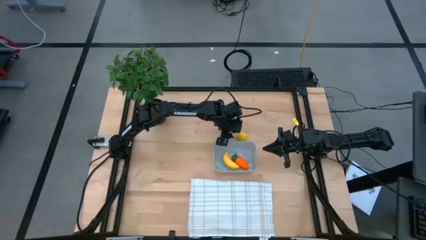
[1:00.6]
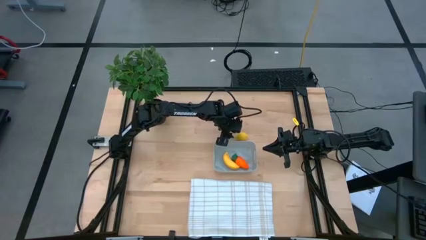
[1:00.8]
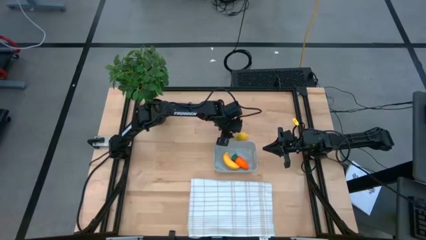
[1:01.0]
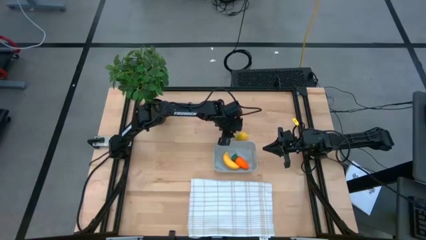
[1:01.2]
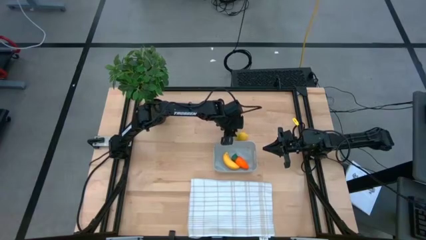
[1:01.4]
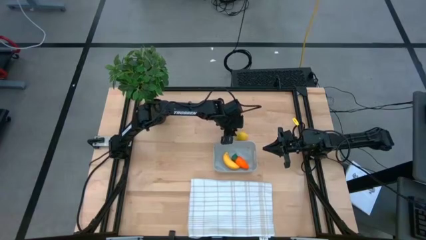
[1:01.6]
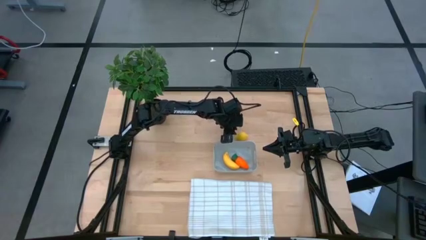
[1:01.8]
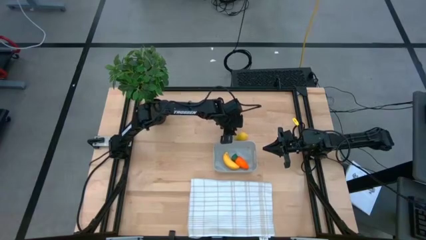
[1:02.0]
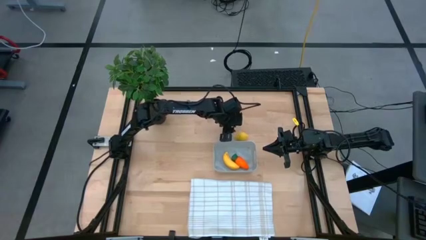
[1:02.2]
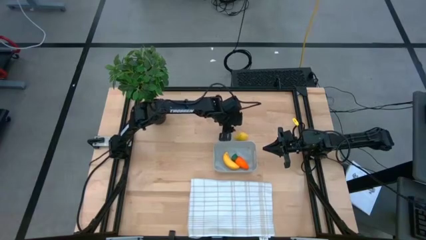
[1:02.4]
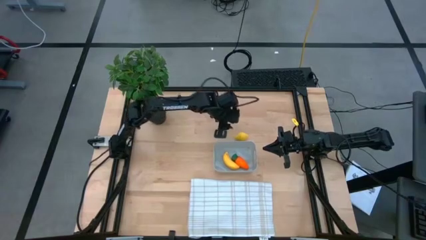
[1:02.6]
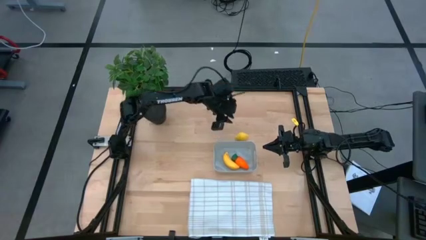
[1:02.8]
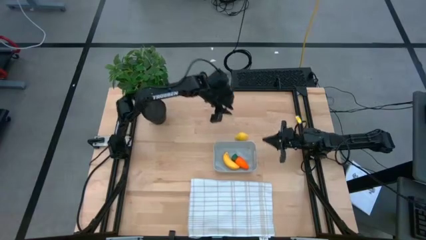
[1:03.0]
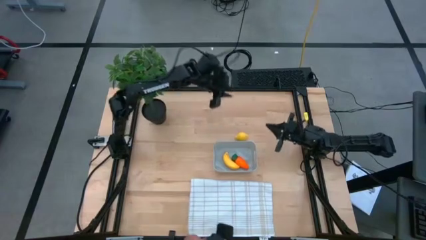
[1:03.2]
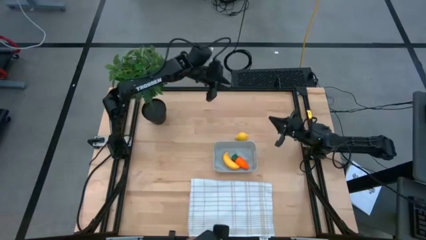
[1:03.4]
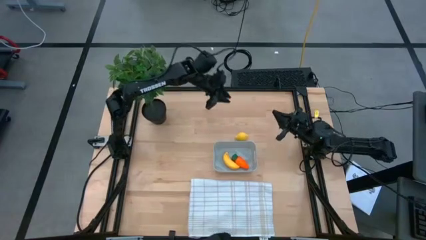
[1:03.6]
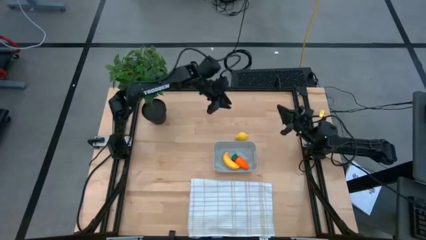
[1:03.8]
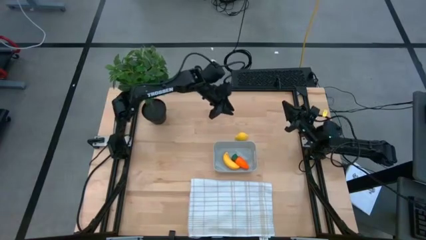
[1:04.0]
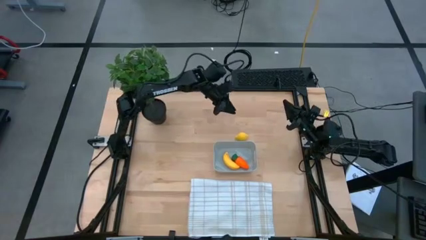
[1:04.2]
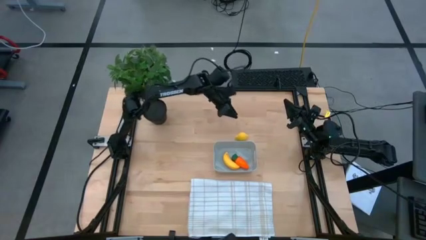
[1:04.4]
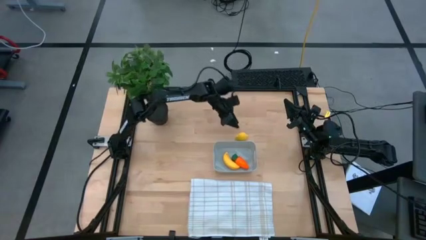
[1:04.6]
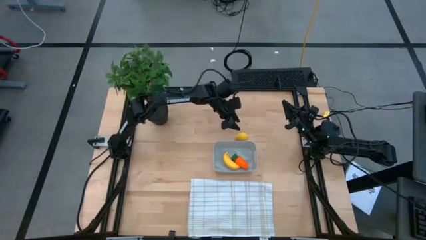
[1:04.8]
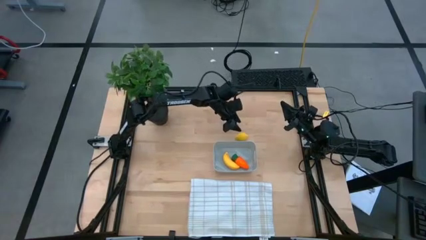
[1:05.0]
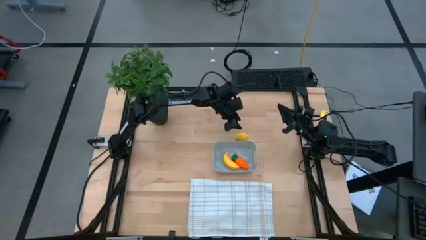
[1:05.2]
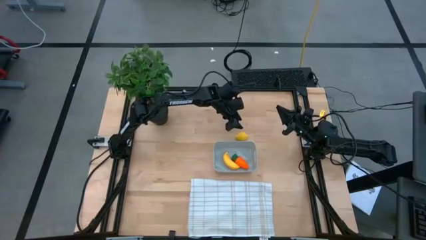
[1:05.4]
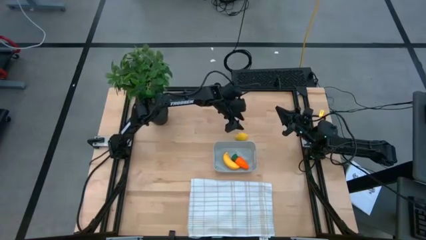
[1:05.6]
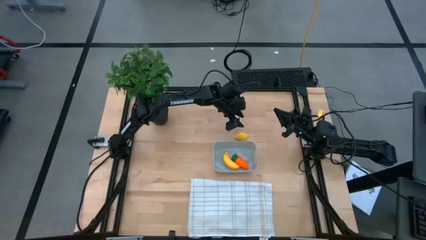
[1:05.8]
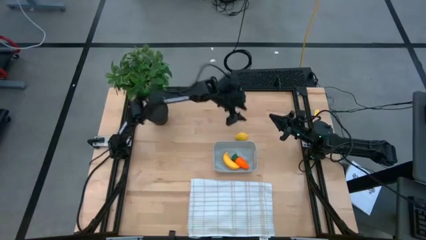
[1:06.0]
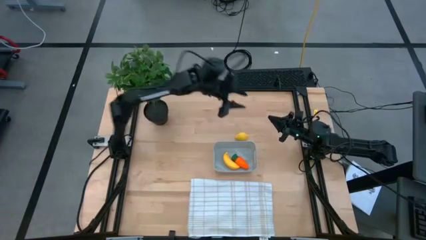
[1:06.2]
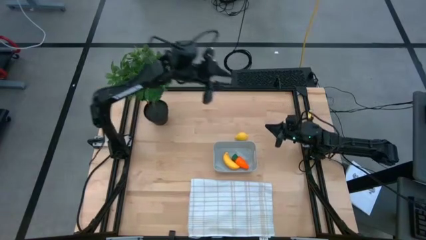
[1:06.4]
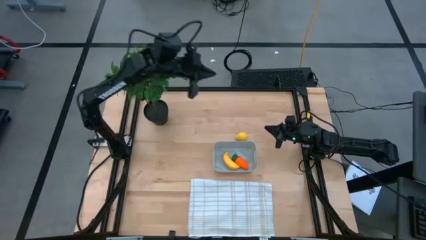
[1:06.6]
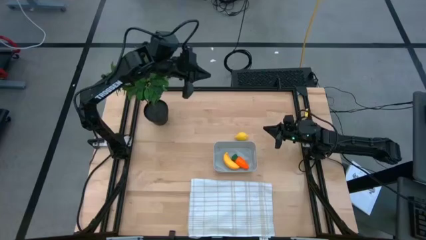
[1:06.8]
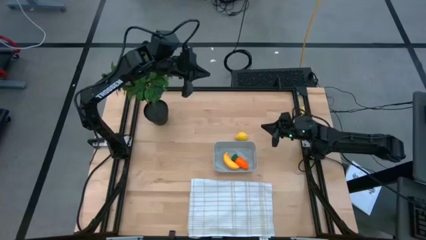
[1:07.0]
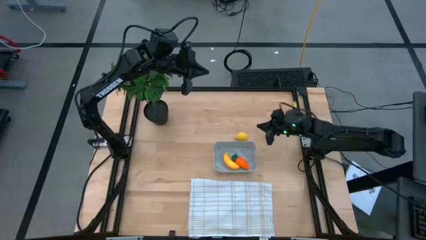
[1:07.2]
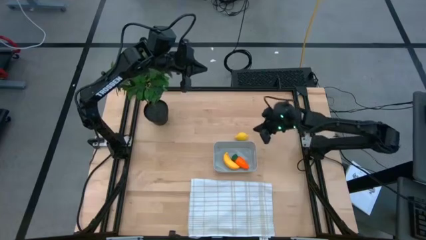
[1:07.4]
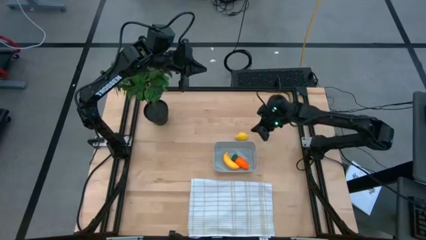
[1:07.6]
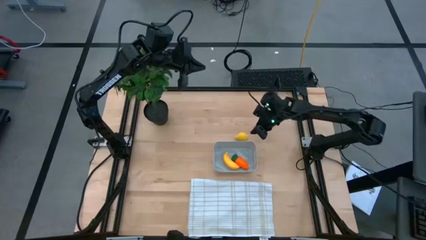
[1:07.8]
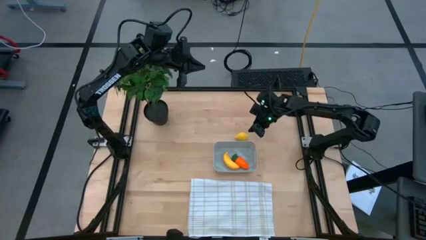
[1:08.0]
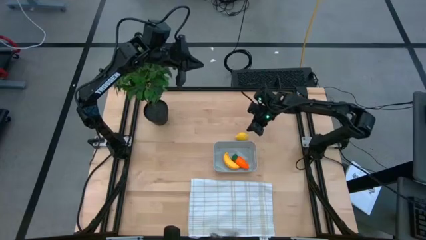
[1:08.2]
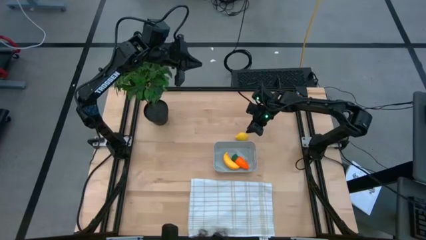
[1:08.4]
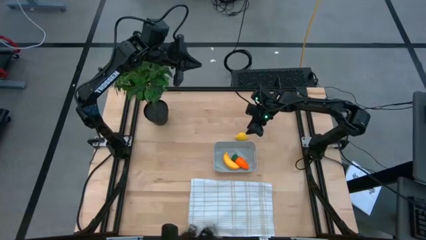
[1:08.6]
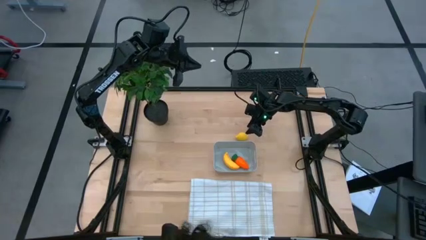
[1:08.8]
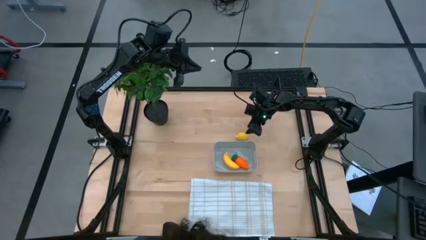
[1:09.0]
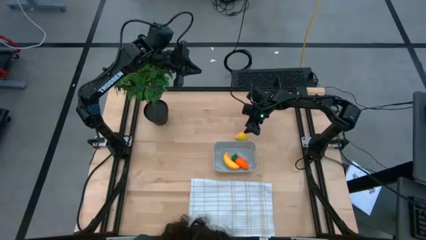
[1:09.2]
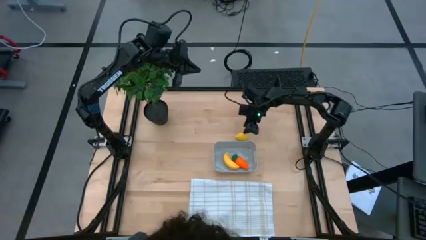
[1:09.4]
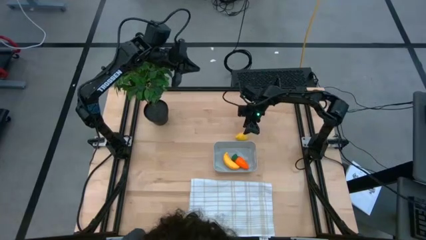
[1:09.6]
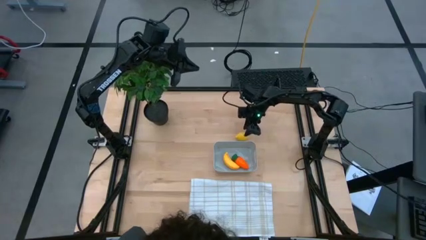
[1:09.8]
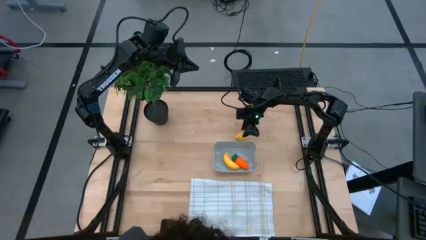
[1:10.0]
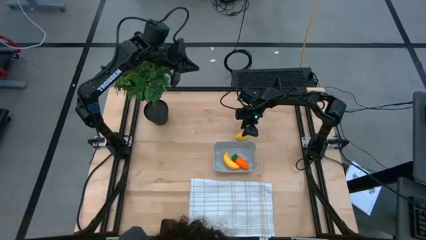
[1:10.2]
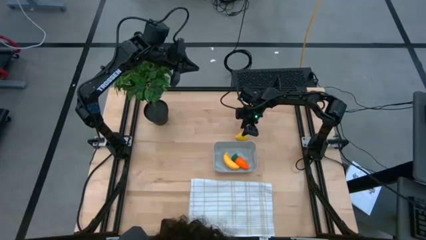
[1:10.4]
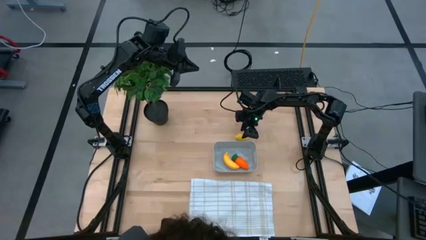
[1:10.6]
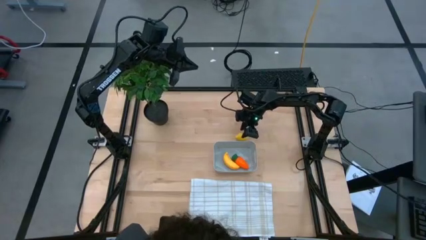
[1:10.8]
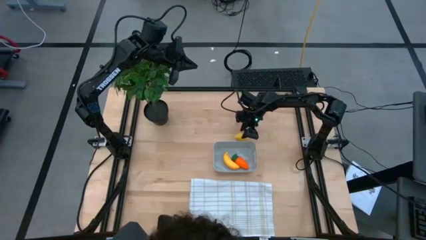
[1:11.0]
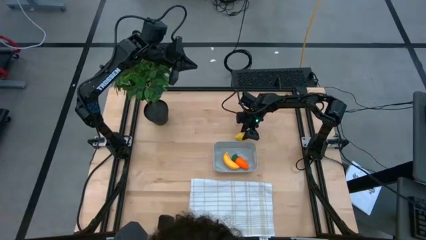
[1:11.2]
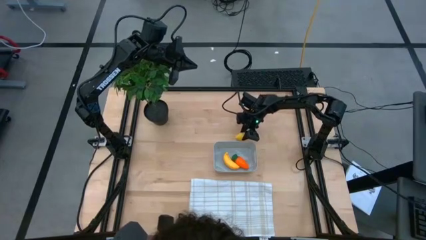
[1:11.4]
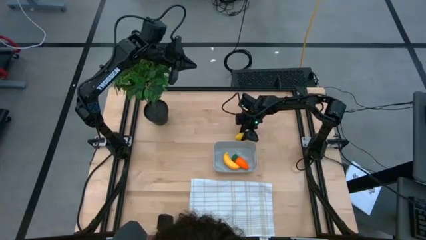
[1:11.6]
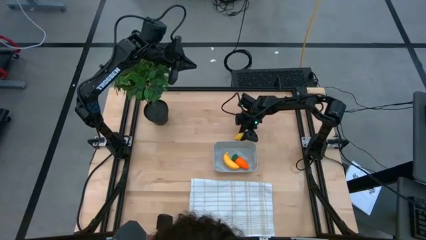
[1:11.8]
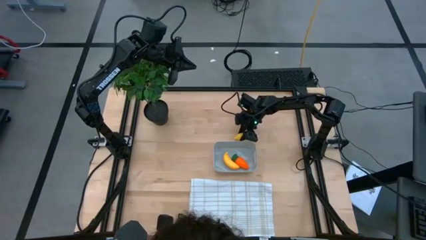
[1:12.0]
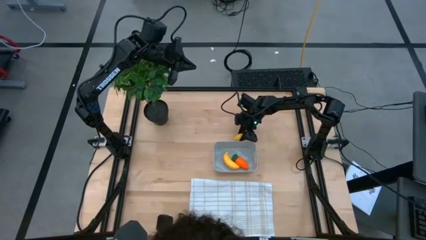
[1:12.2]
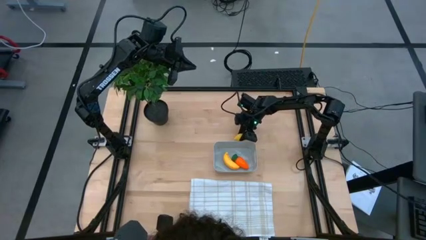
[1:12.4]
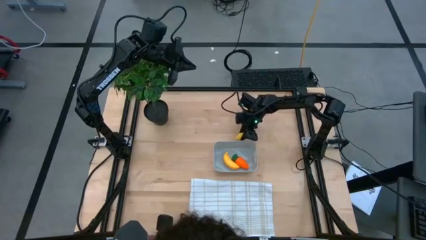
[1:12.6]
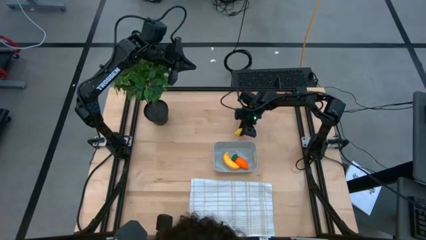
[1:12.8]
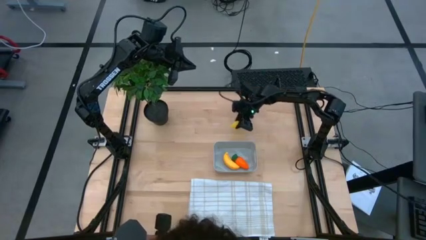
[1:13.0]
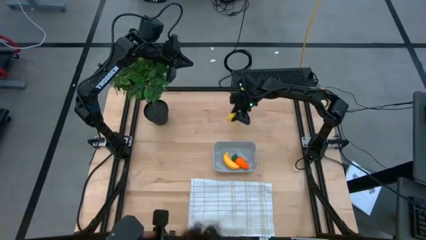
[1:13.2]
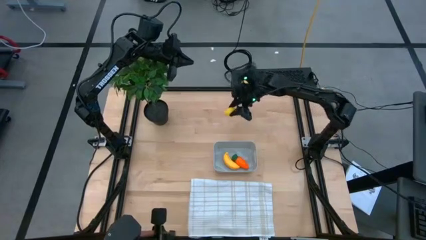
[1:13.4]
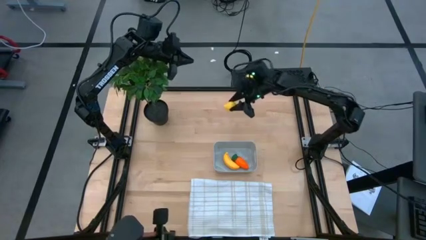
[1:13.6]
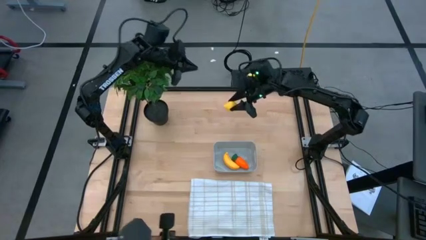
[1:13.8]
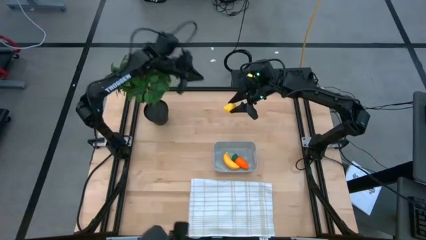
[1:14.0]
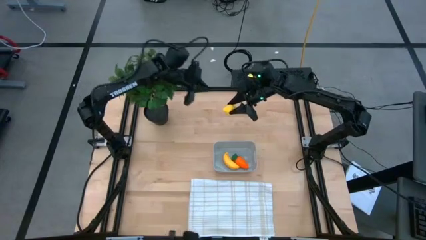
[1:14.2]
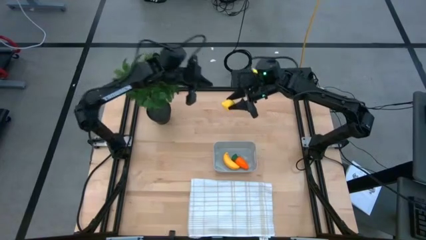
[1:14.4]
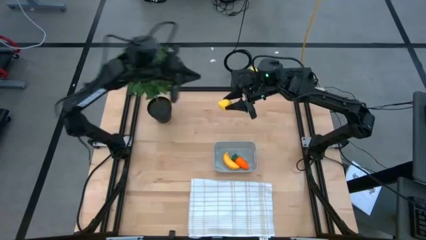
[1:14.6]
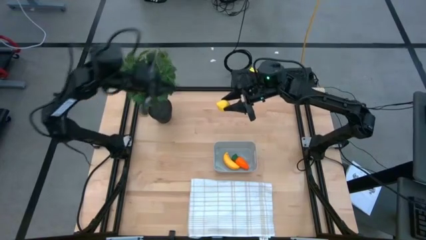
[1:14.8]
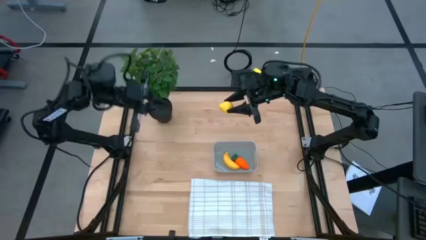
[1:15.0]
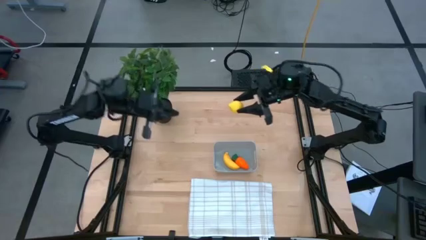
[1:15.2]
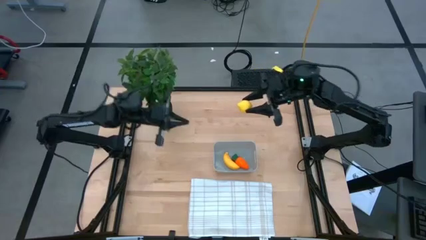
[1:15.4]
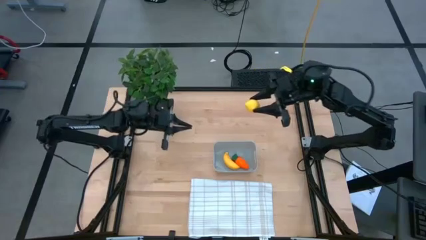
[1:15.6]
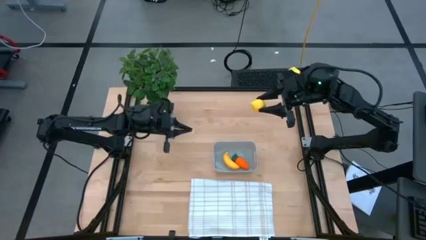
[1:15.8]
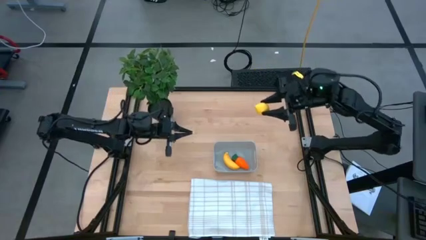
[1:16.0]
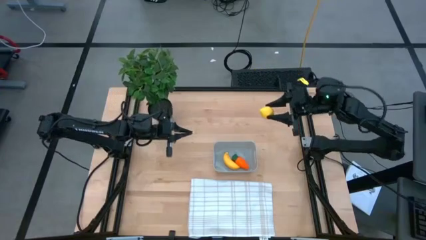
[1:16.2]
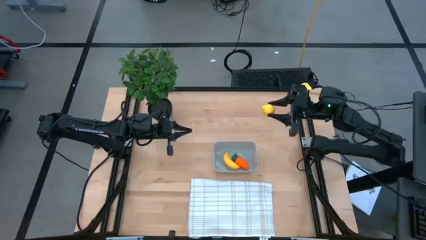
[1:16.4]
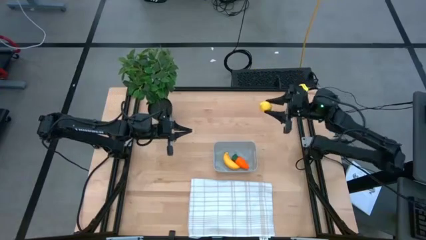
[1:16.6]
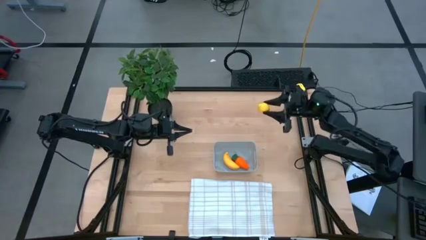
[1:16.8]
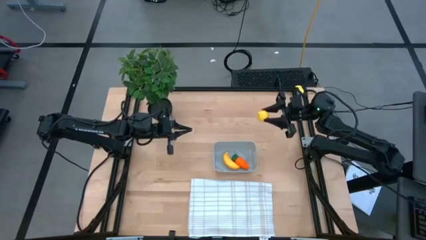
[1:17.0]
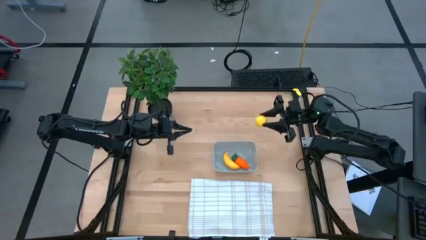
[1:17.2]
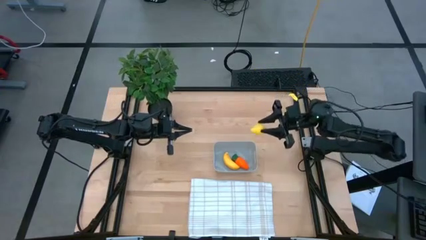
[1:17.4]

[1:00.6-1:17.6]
Task: Pick and placing Produce into tupperware
Put the yellow lemon into the gray bin
